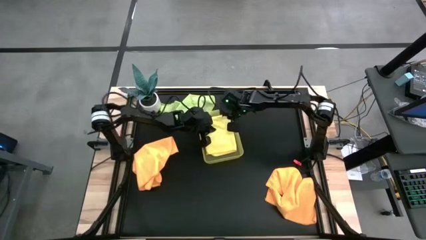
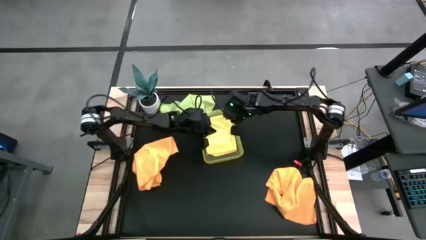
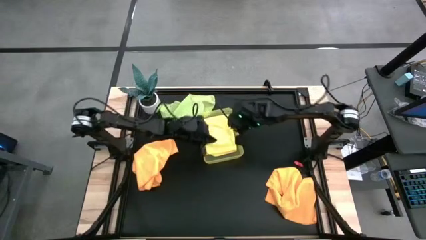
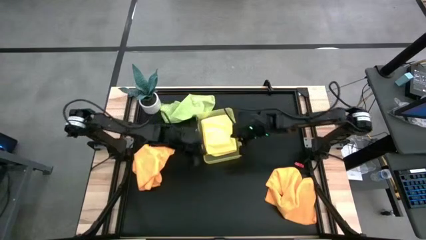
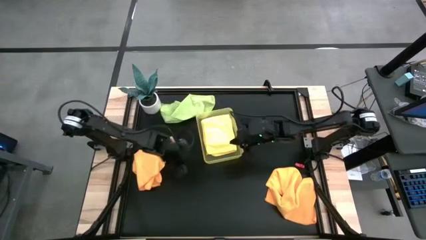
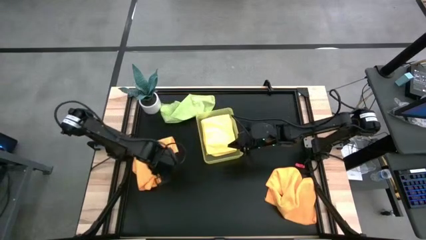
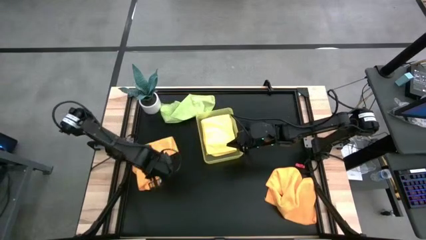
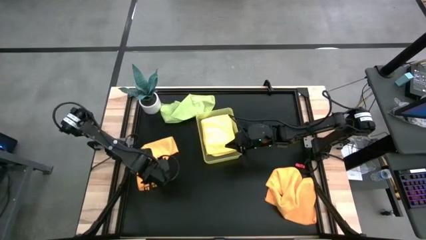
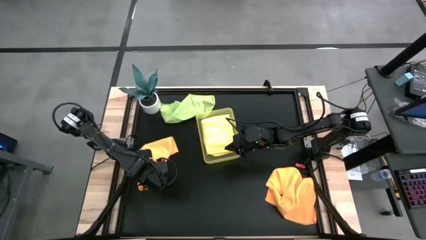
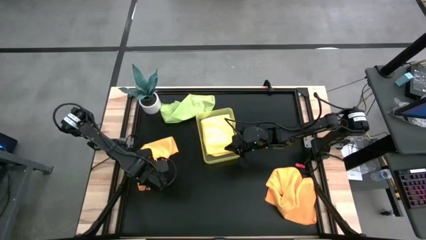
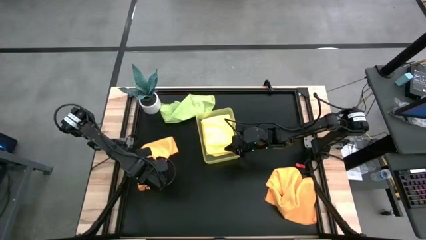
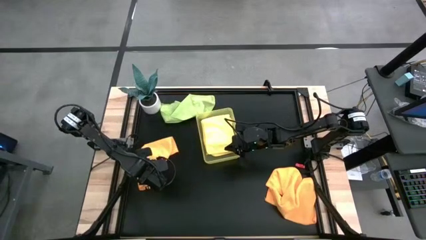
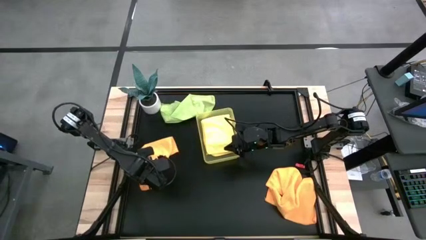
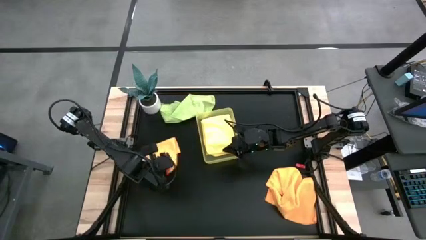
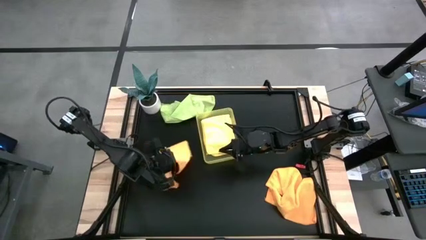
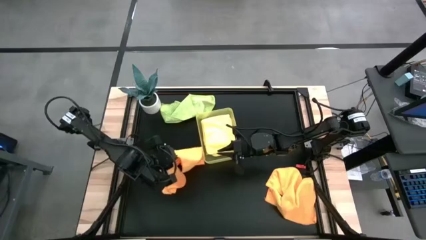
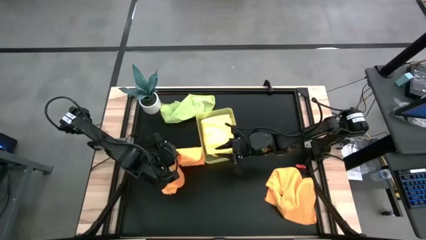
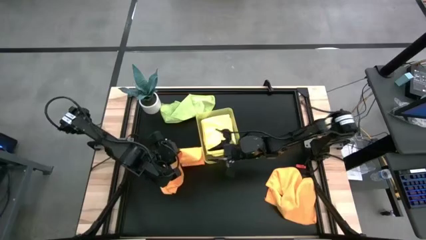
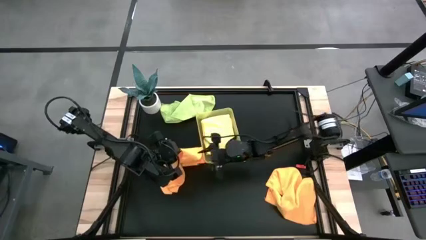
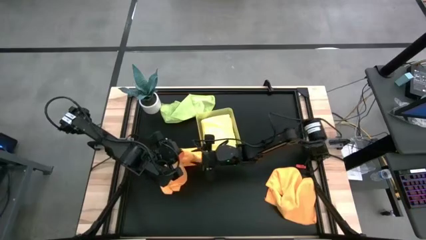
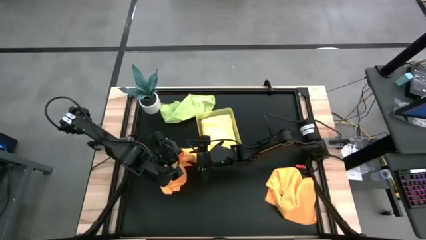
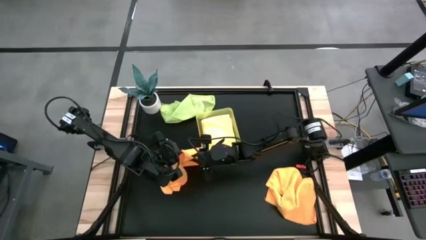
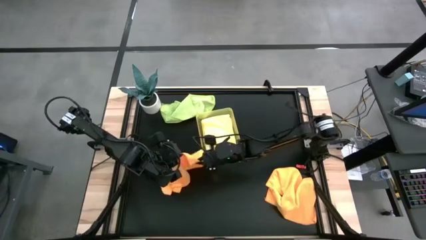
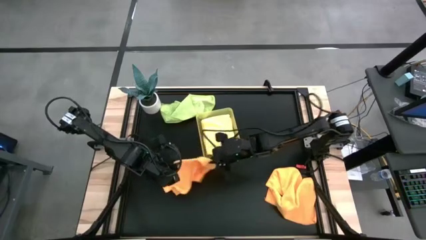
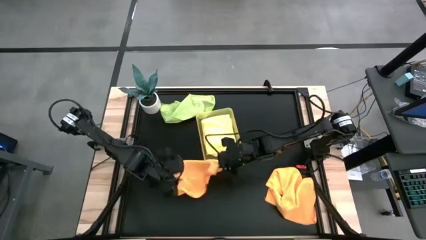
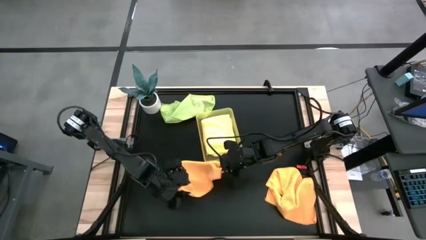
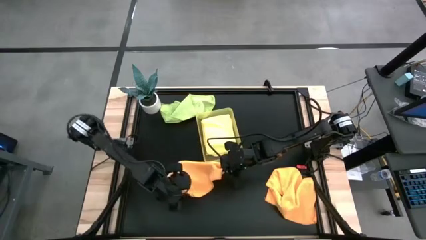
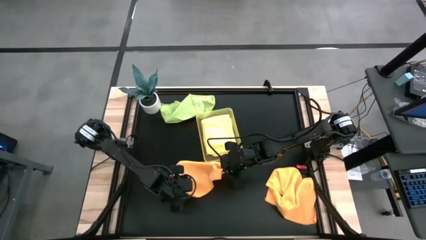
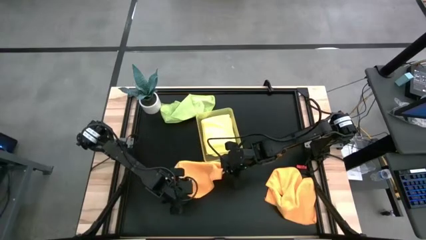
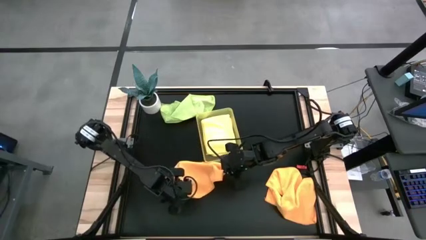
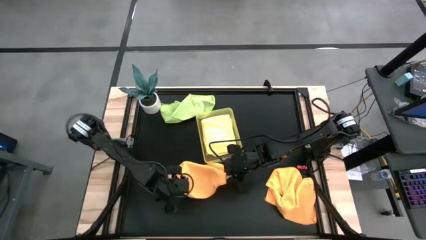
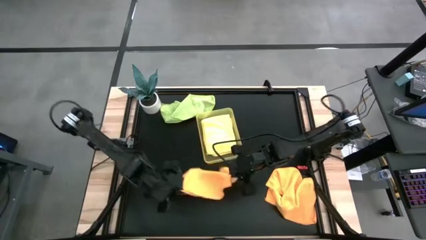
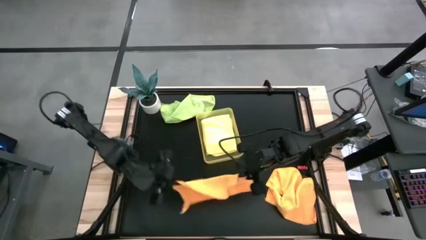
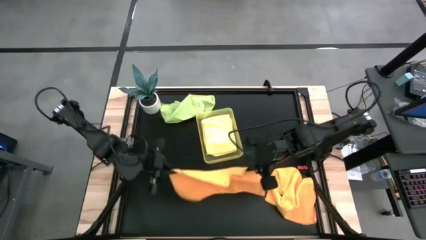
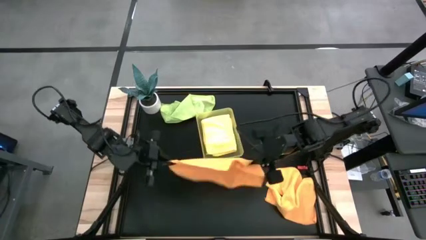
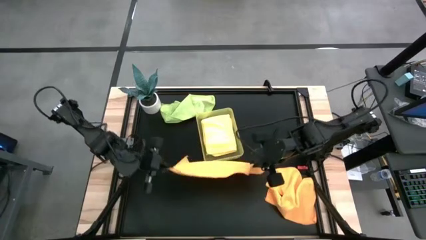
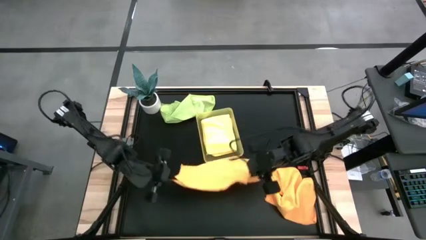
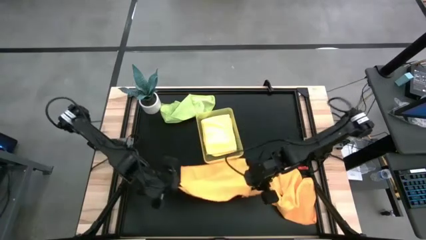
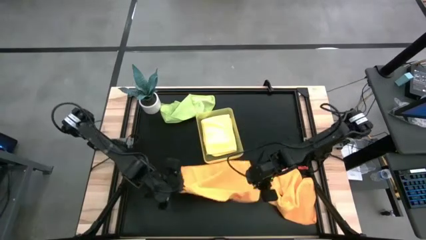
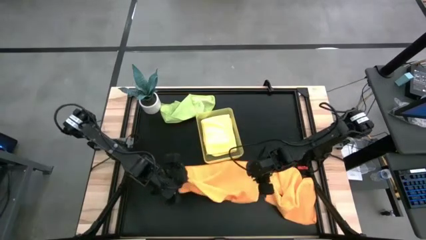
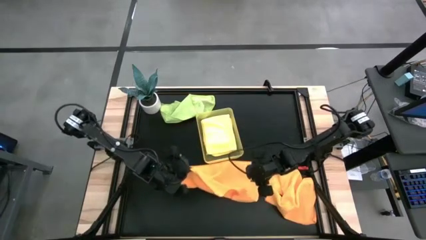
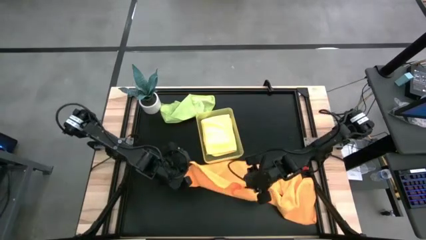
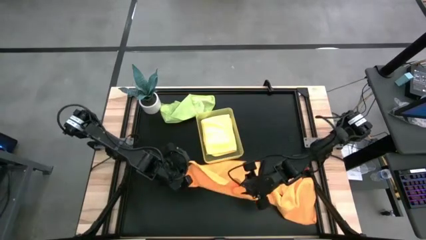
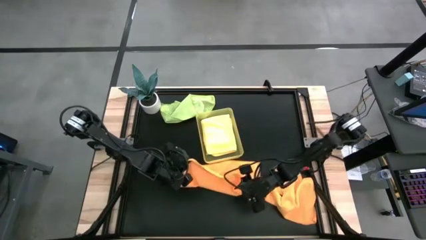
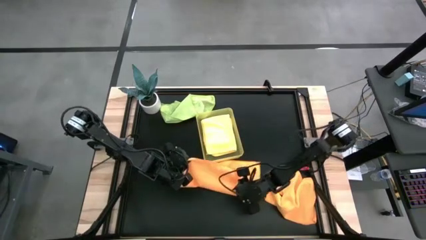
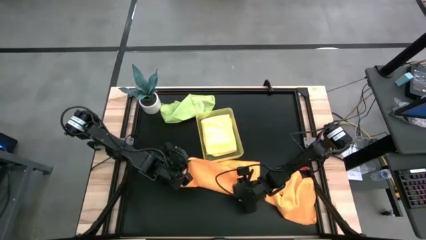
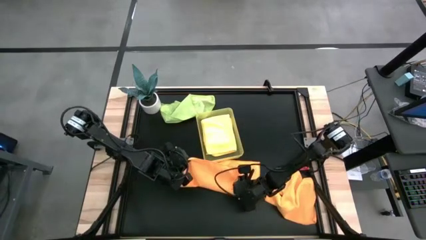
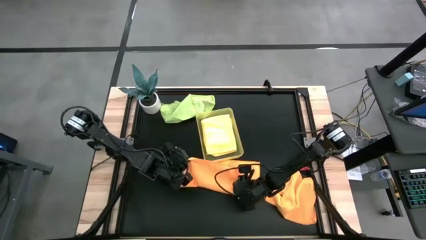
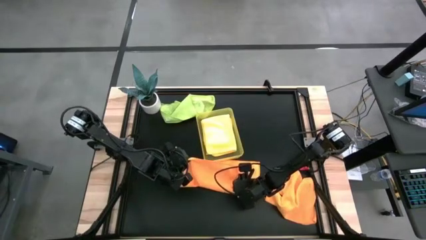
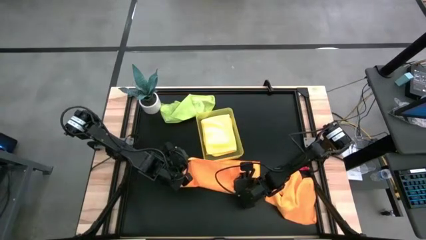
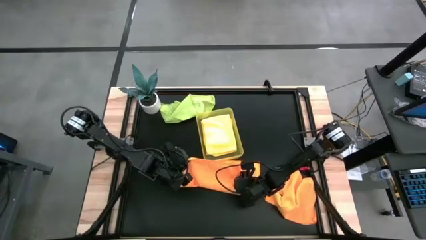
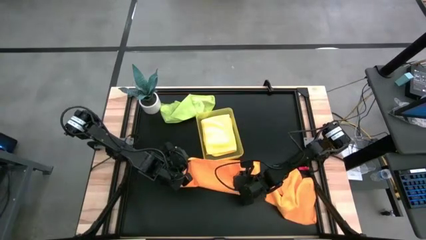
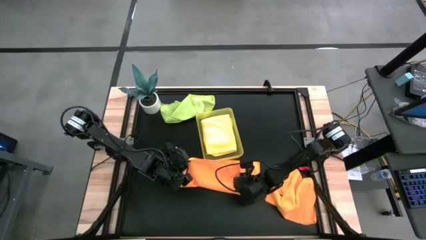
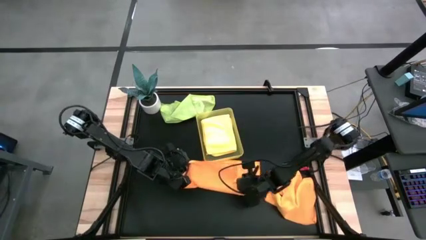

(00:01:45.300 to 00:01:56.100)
Task: Fold microfiber towels
Fold the left orange microfiber cloth

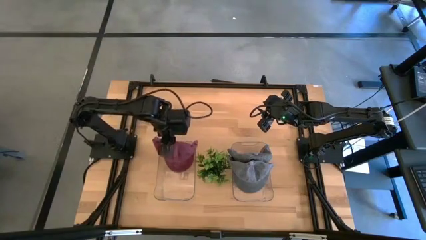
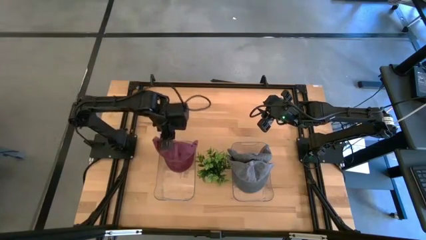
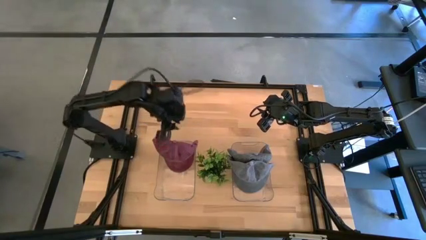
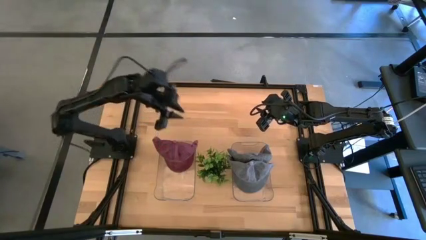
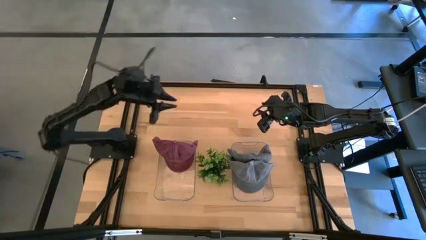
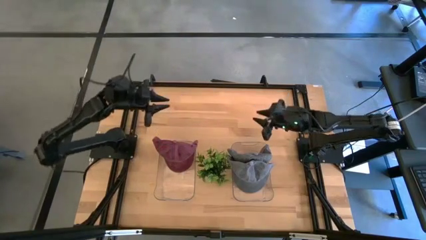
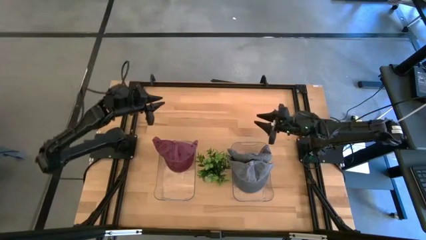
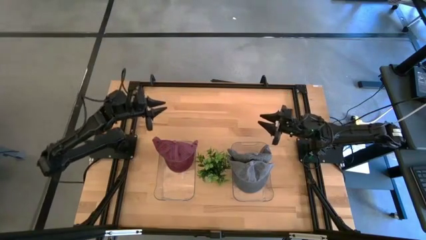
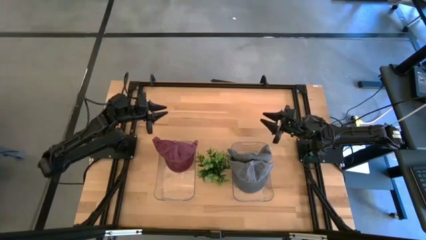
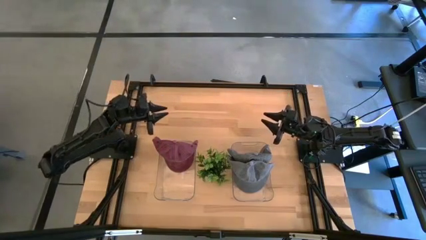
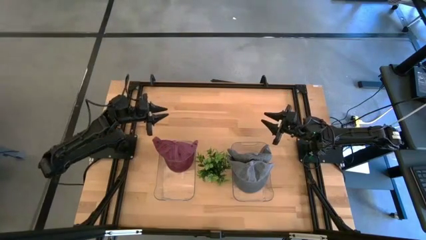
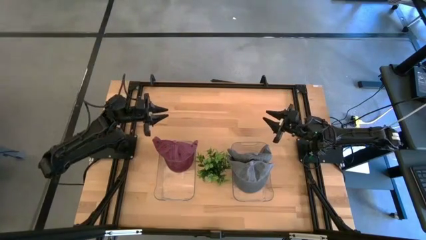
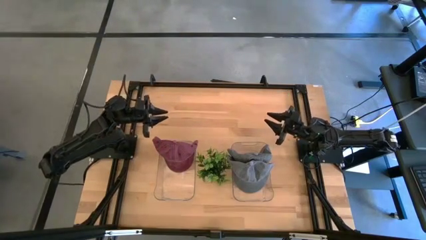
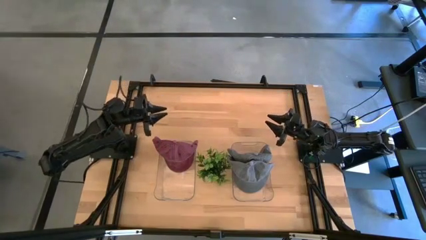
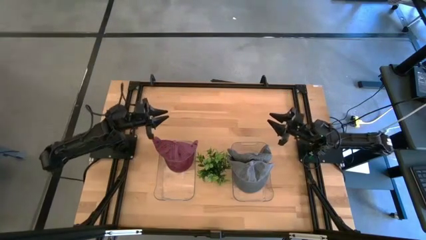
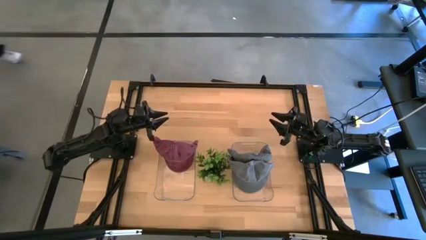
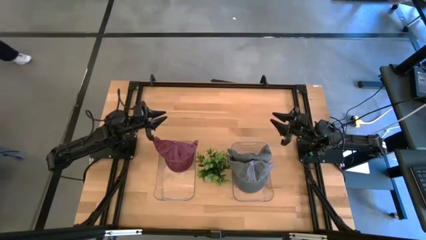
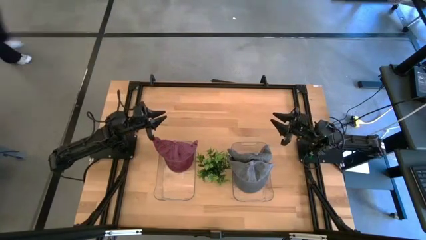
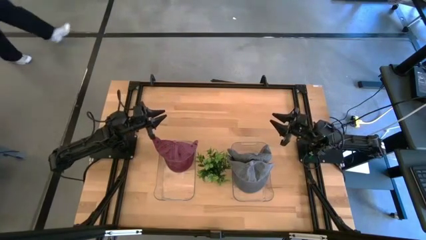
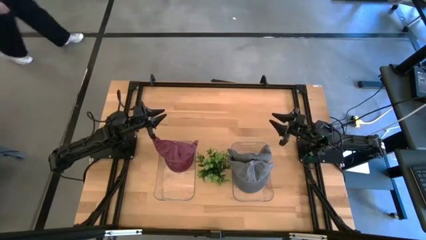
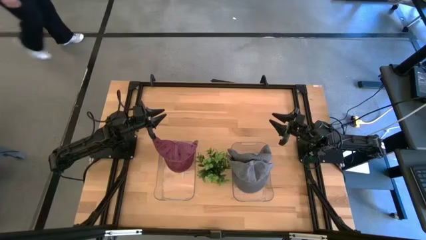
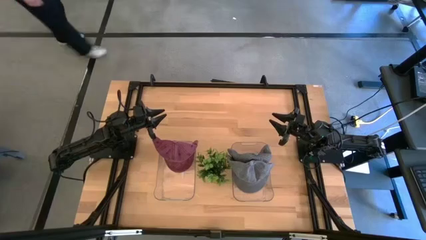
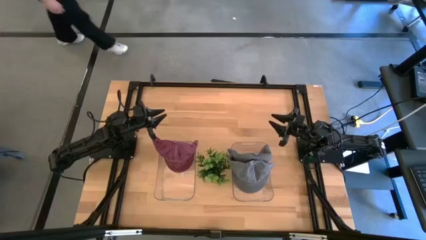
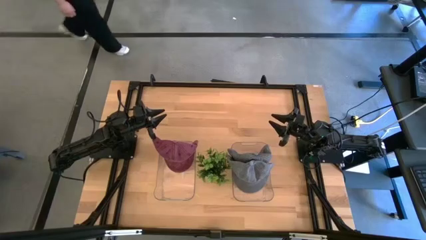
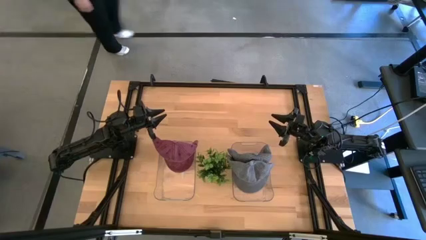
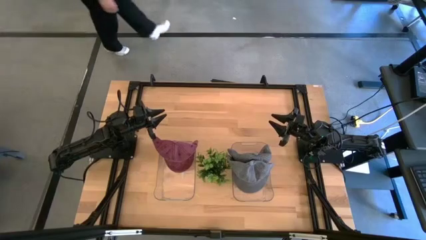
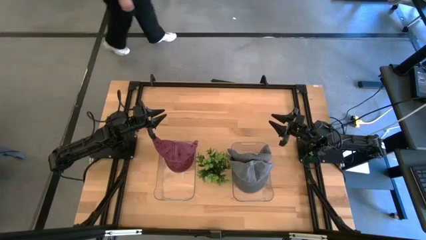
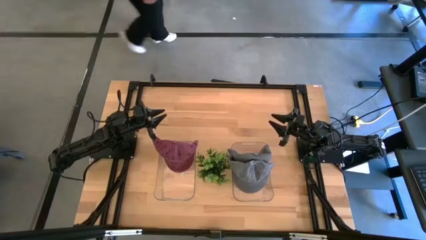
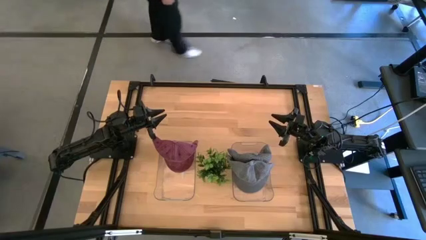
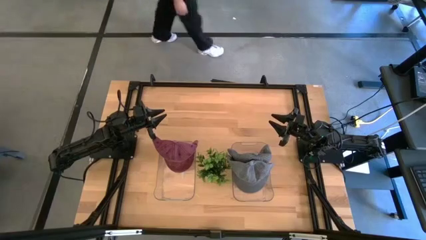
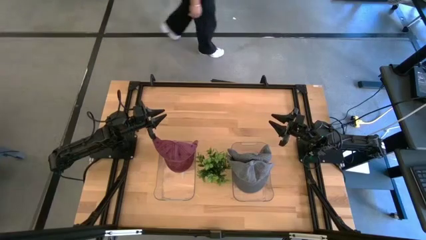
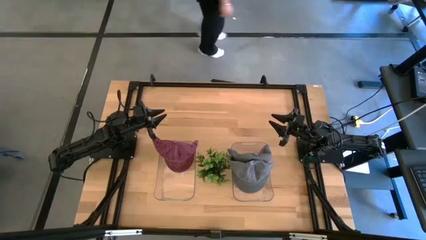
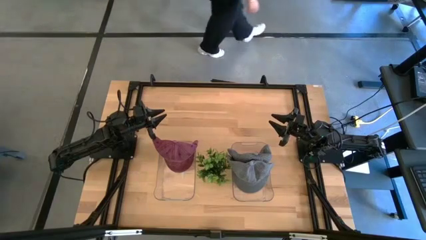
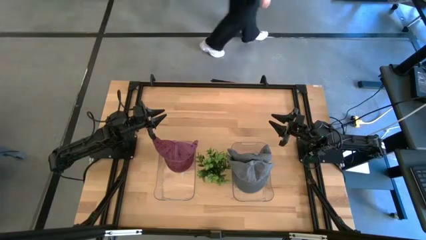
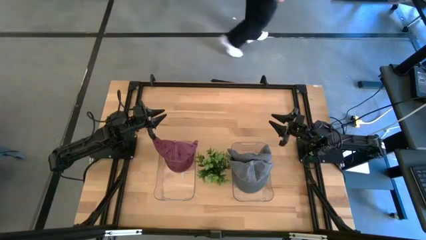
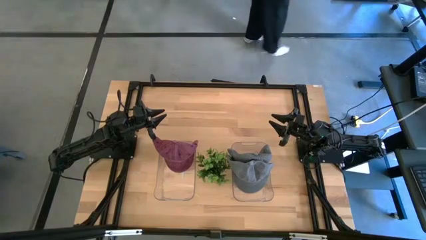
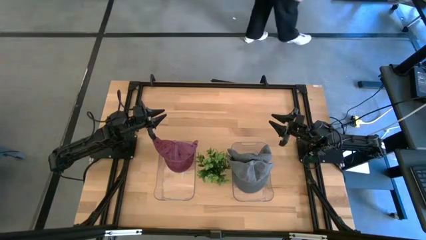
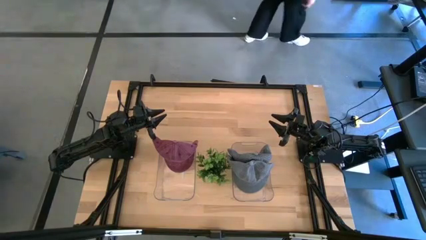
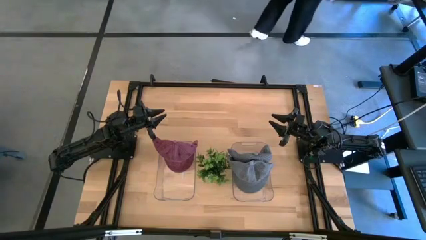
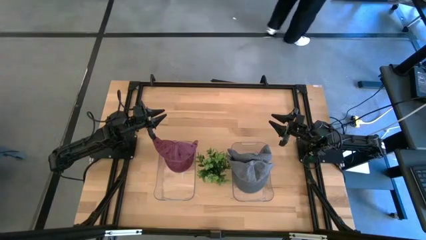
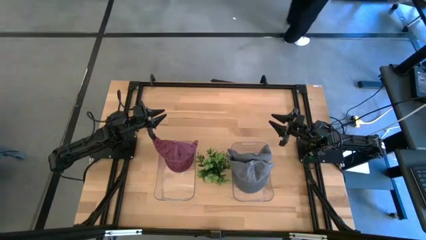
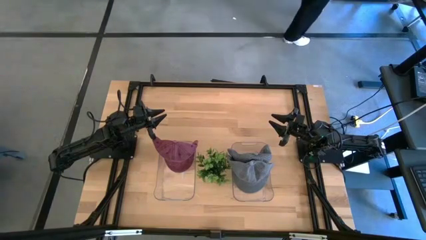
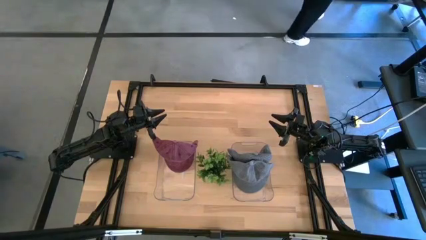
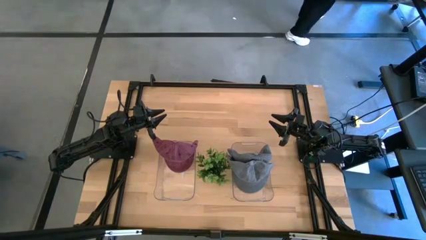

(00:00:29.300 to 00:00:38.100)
Task: Pick & Place hat
Return to Home Position
